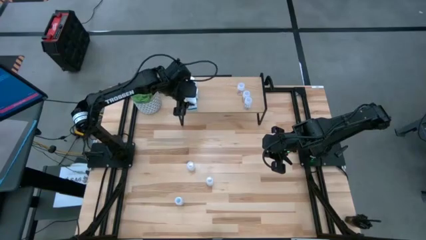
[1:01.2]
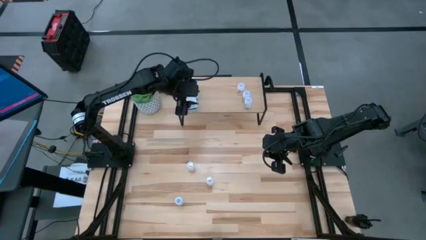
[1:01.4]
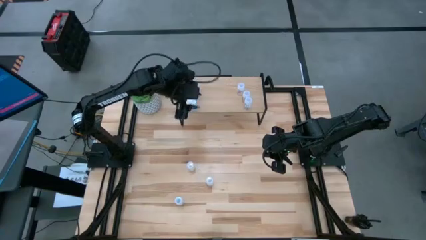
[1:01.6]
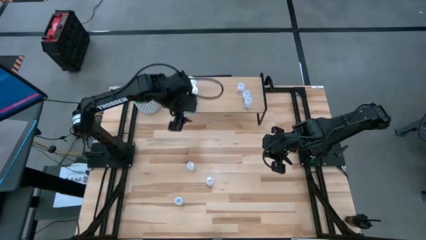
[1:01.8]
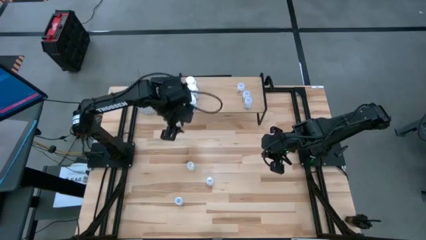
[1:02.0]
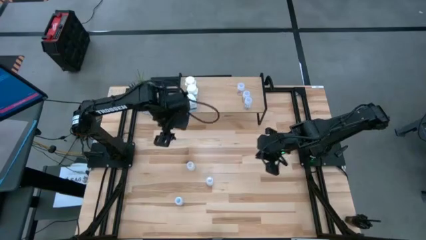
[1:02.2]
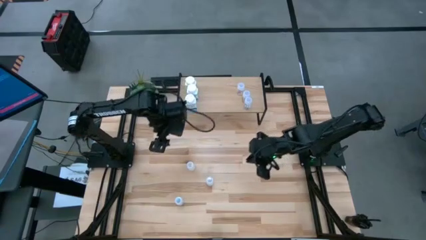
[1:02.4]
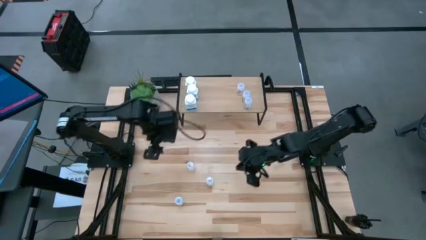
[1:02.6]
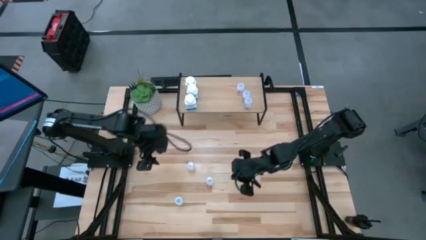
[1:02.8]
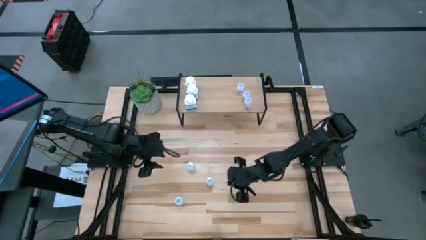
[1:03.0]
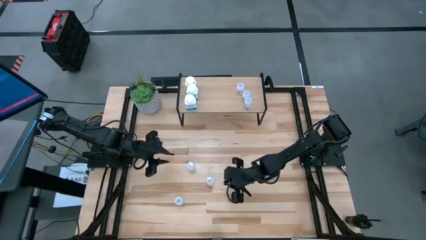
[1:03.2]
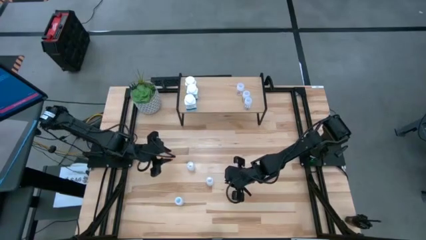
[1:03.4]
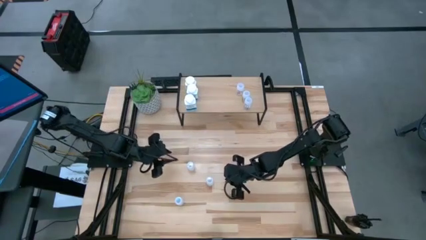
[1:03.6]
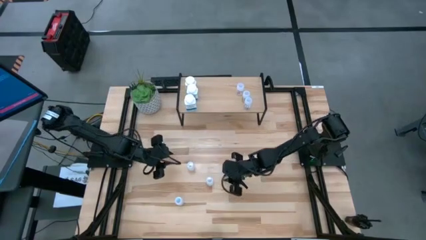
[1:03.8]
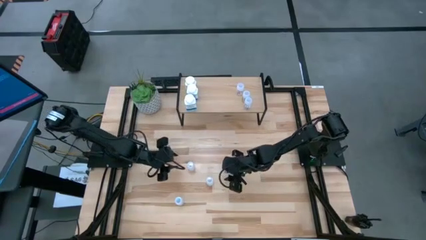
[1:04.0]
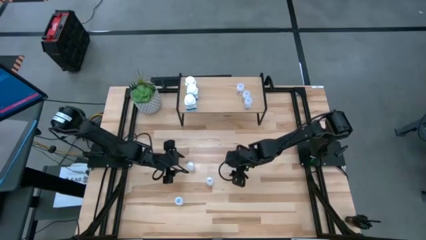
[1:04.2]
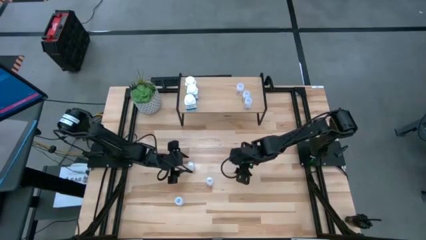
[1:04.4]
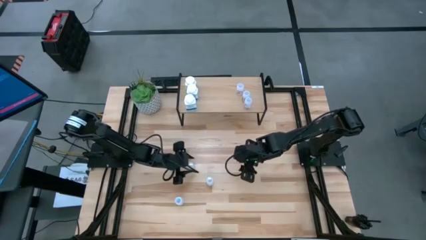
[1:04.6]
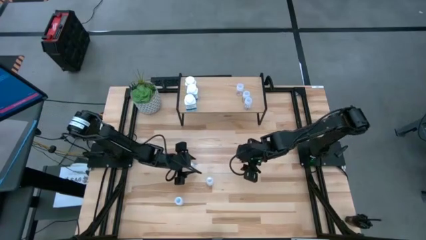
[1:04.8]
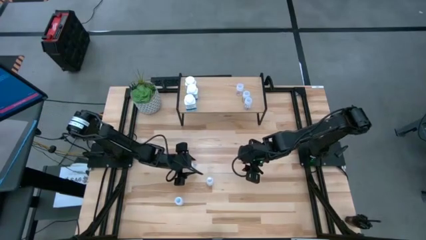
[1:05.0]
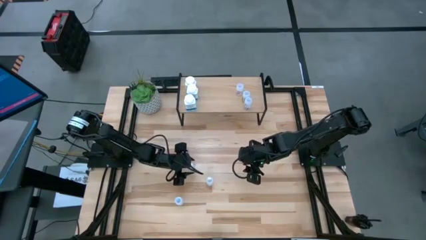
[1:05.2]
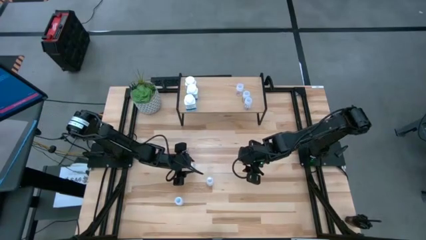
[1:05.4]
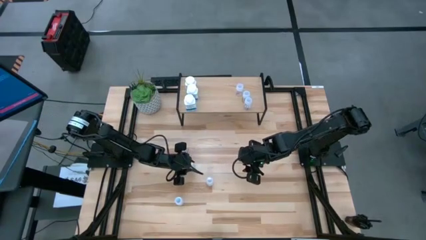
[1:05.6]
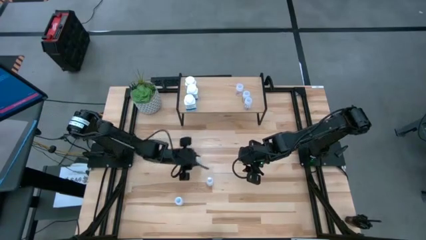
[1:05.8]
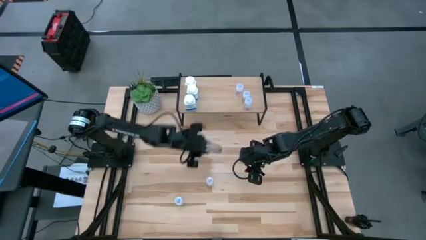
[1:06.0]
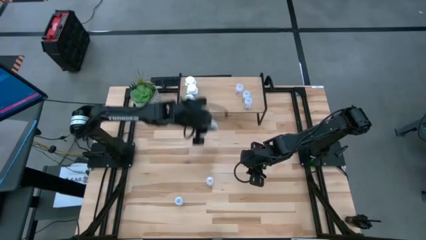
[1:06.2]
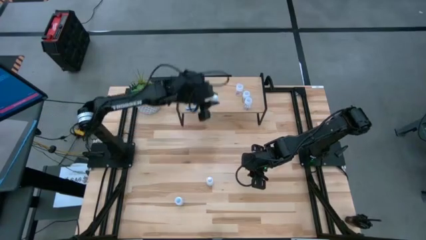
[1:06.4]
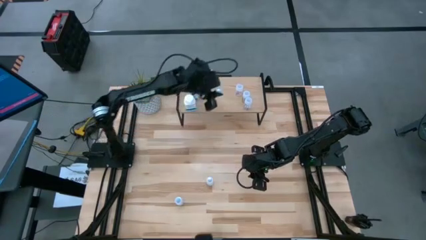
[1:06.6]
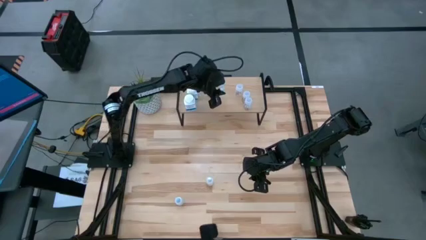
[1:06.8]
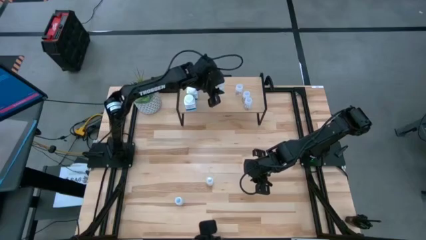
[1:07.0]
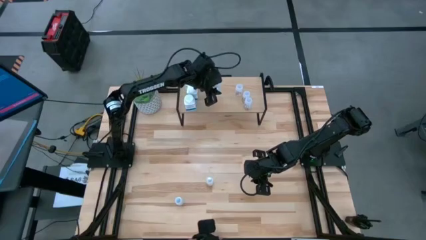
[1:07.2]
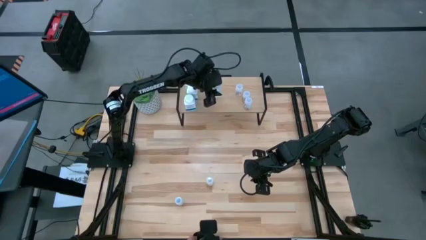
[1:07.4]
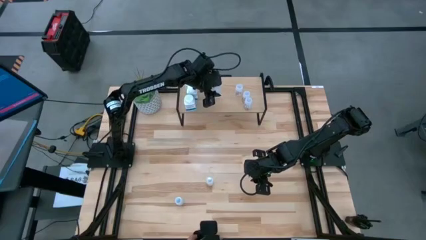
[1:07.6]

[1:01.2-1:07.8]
Task: Pick and place medicine bottles onto shelf by color
Put the top white pill bottle on the shelf

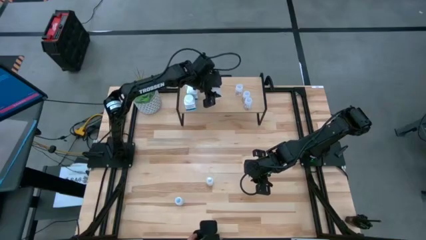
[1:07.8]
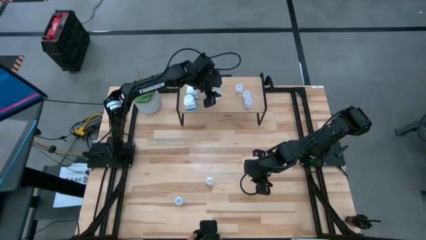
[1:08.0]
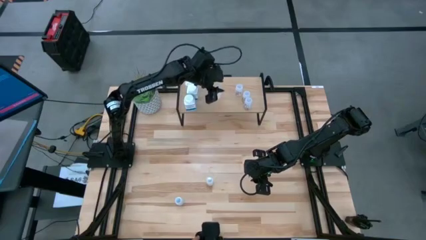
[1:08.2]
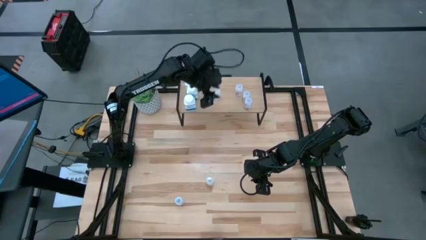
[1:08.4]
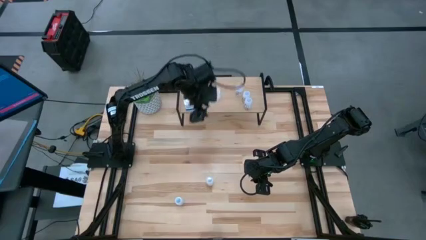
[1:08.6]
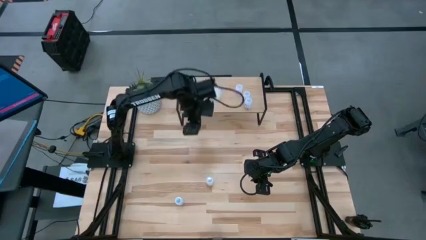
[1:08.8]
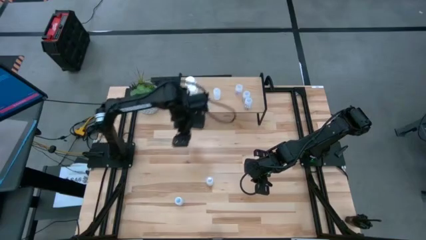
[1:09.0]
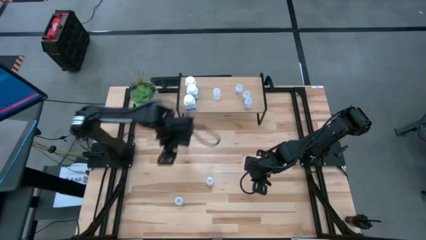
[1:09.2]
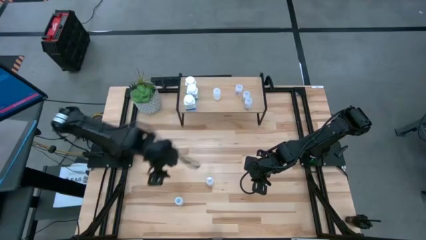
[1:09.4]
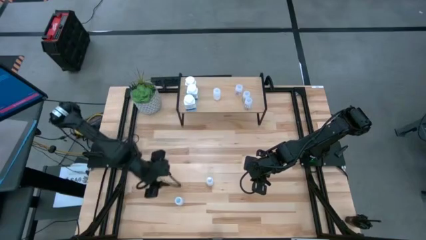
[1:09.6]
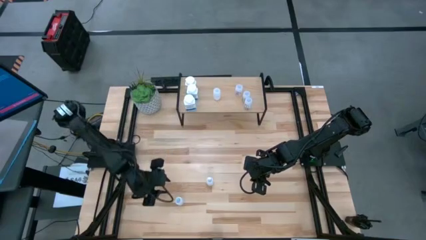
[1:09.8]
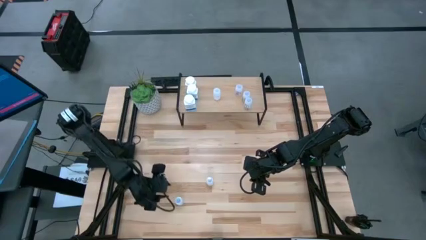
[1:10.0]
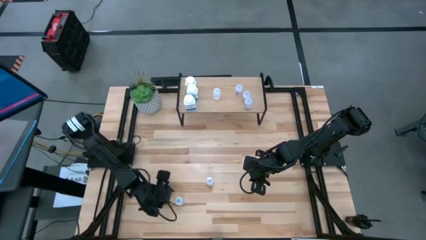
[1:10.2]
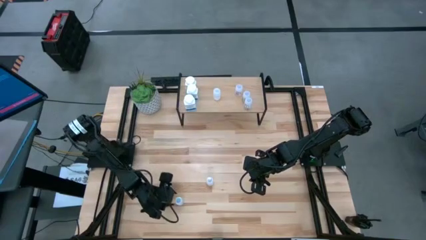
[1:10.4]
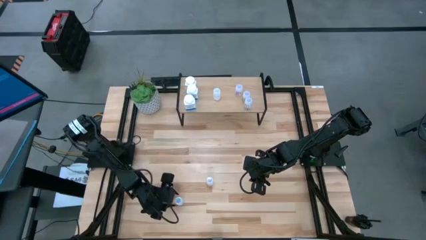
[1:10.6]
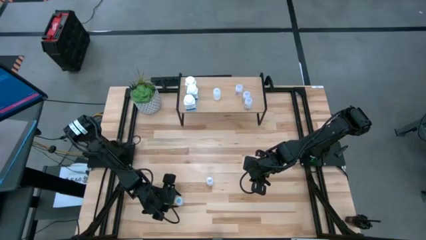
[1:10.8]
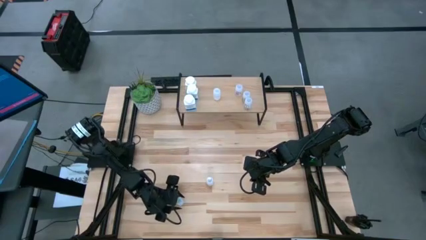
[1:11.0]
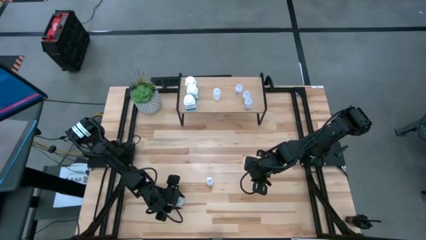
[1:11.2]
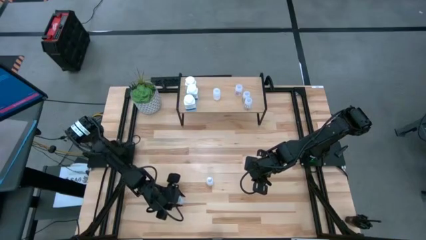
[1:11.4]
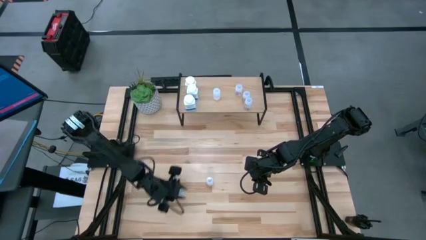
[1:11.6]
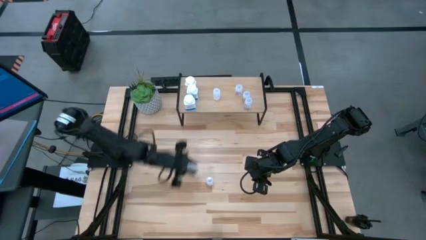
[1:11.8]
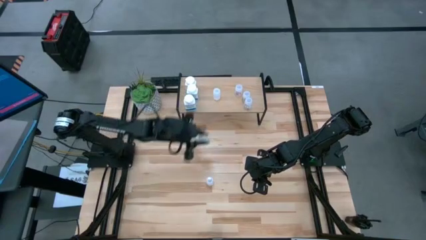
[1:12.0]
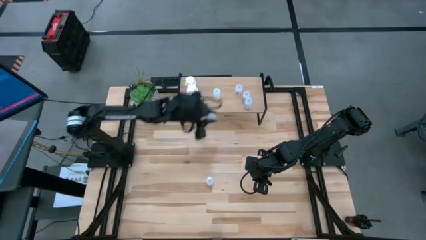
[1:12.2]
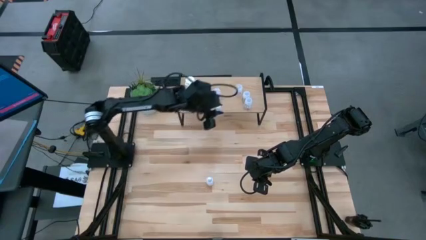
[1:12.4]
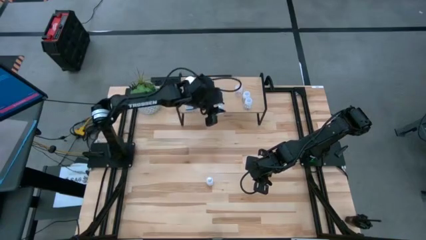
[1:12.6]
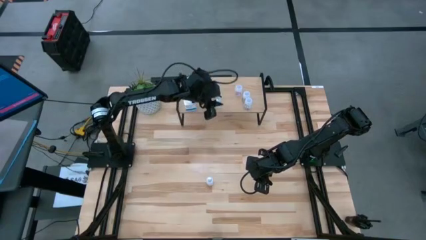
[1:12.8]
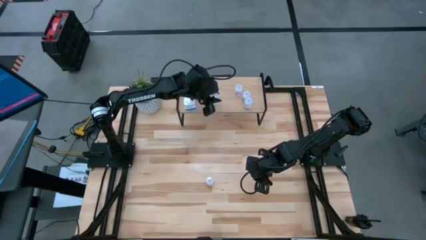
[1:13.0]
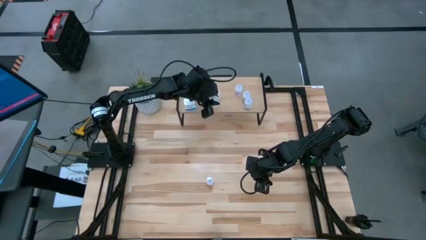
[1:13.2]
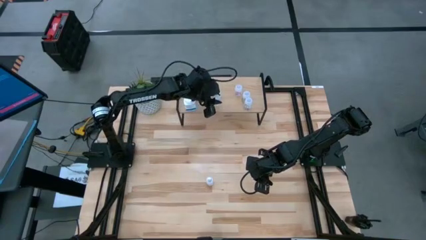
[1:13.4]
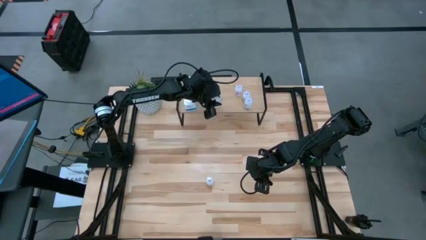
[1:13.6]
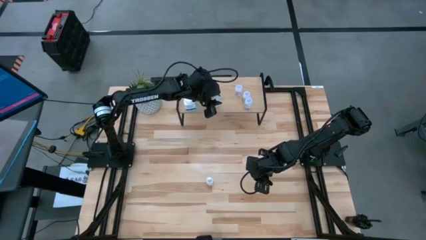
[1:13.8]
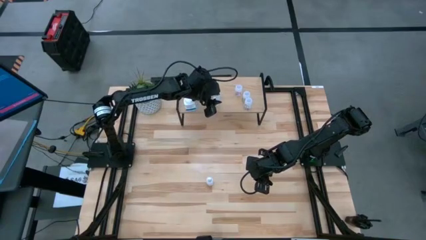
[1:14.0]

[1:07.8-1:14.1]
Align the bottom white pill bottle with the other white pill bottle on the shelf

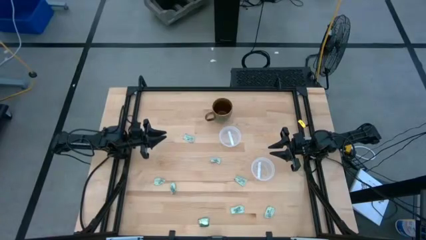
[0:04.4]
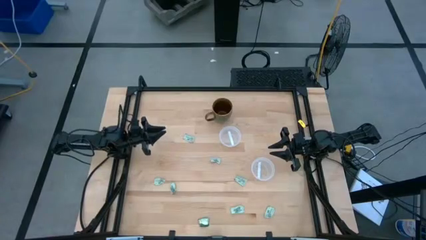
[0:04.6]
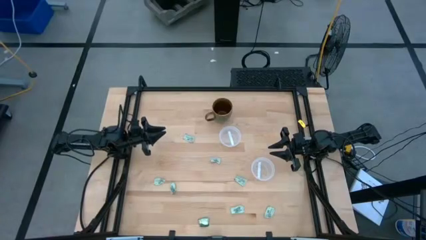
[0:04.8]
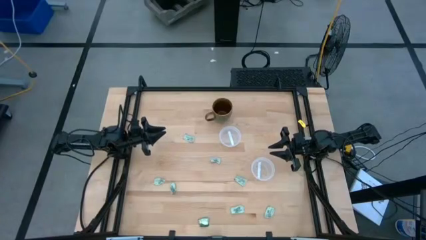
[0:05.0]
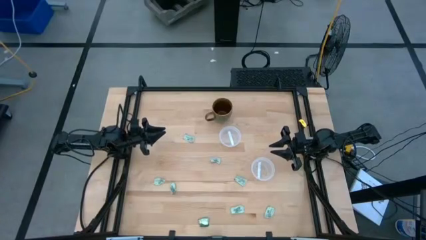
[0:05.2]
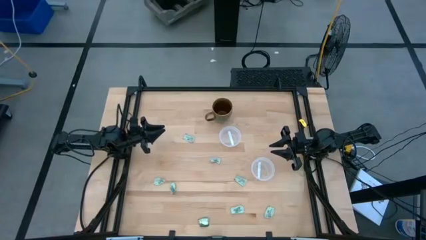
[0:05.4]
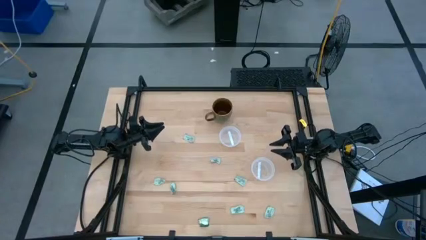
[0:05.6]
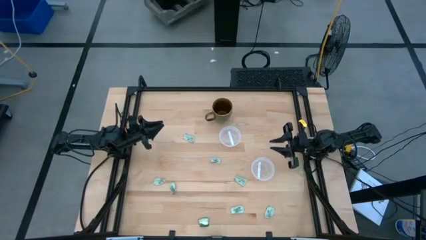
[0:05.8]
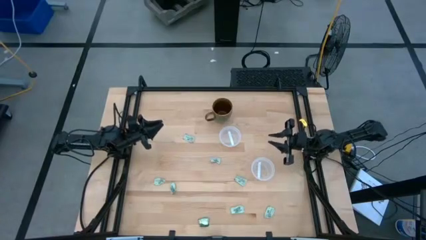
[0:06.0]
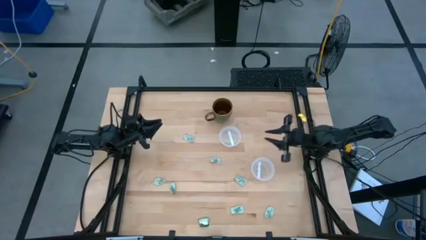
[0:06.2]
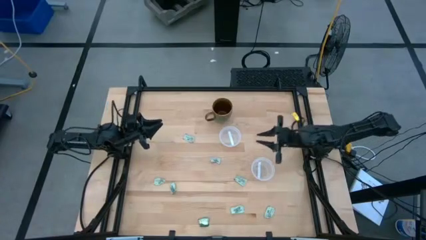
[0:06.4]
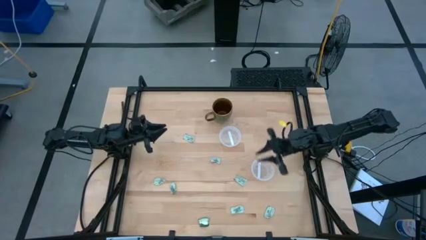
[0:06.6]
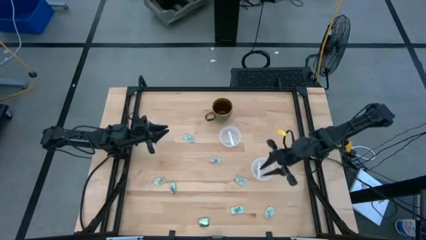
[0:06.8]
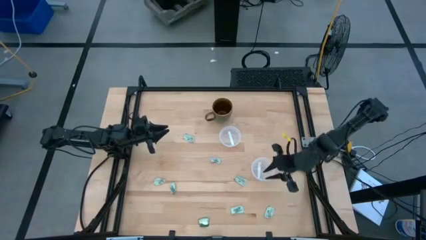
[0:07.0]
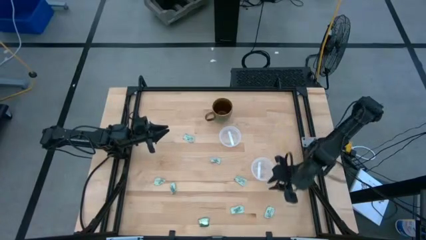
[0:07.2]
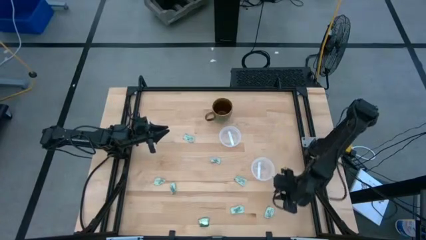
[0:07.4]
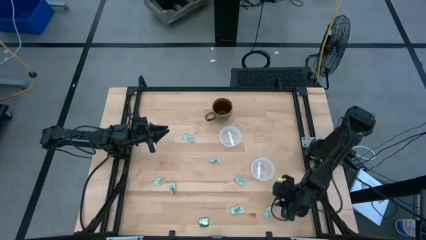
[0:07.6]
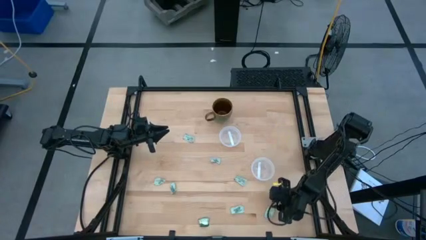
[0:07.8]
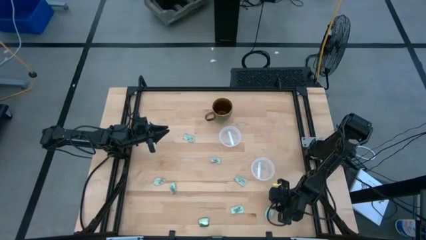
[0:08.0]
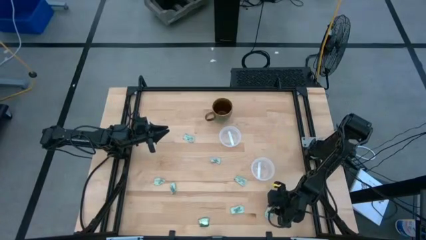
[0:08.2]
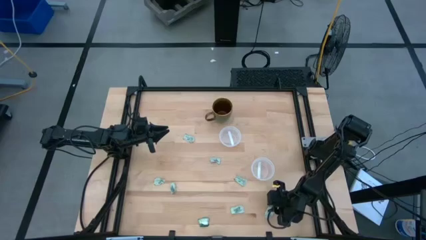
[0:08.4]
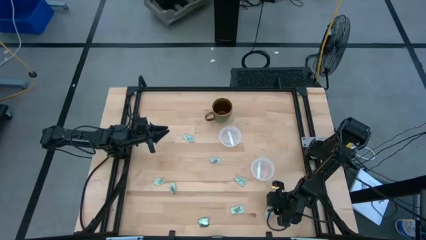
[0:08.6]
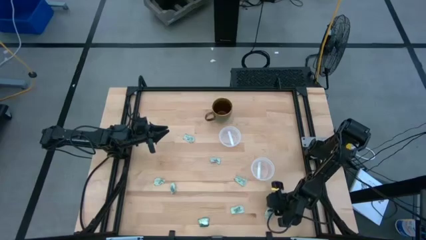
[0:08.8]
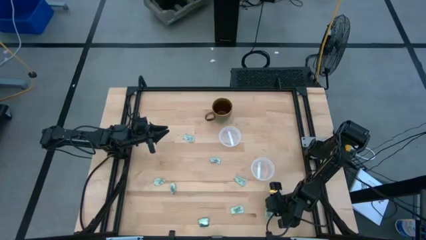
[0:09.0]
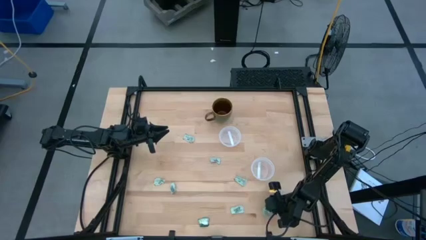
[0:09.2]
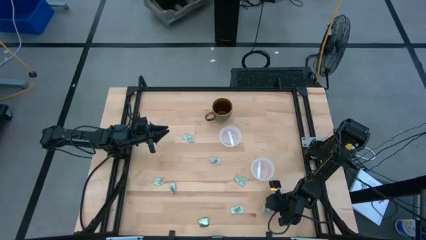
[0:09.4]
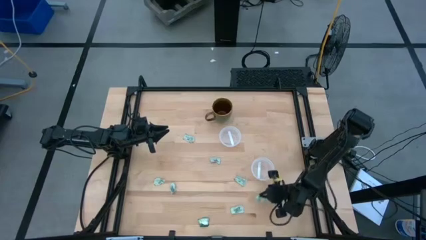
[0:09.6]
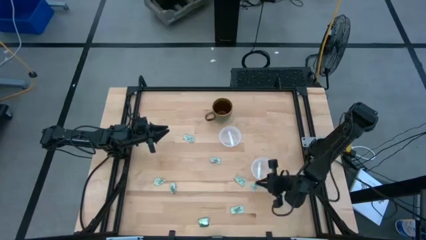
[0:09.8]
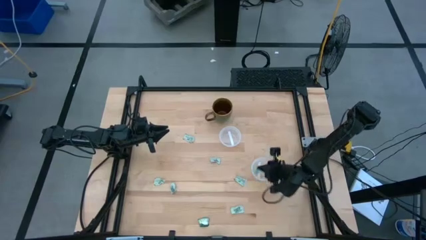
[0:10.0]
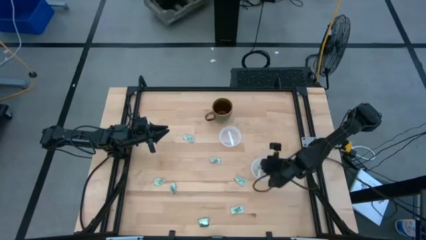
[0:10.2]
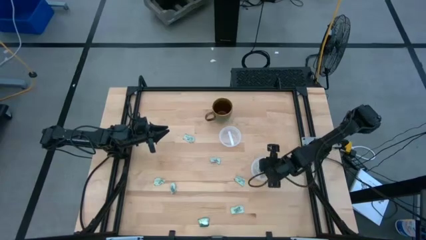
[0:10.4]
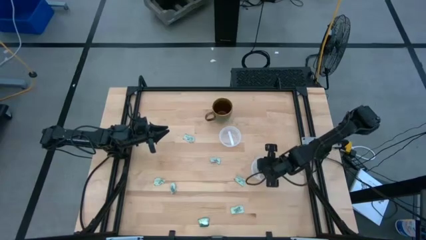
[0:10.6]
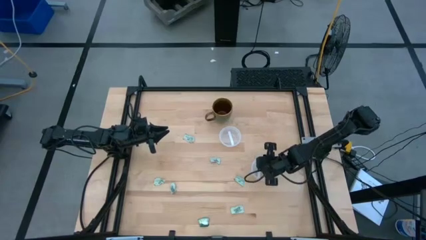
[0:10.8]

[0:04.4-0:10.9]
Task: Pick and place items into bin
Put the stevia packet into the bottom transparent bin
